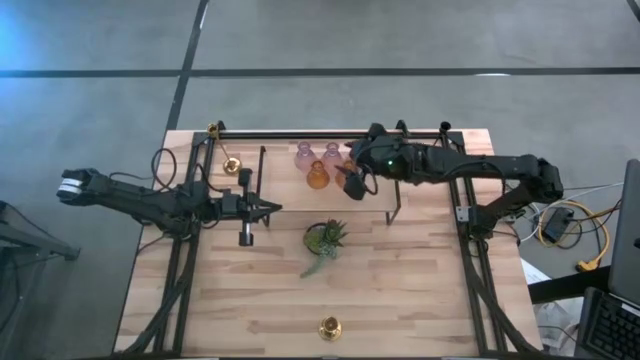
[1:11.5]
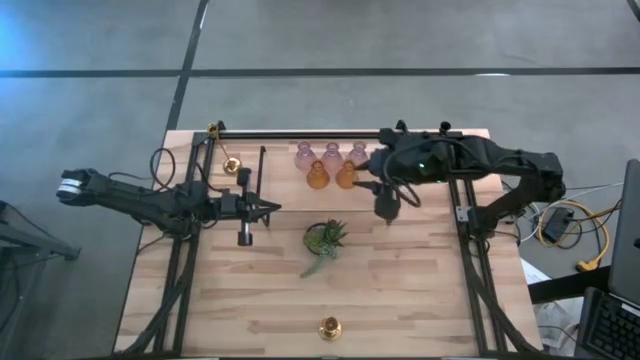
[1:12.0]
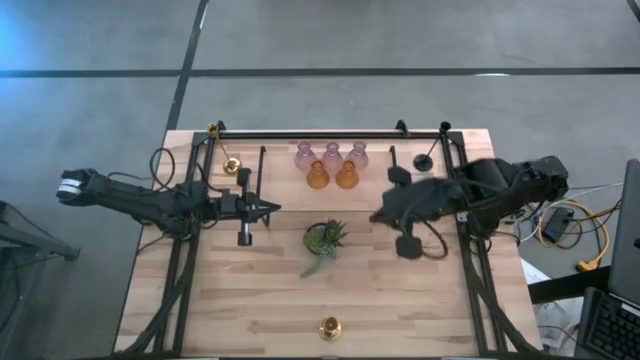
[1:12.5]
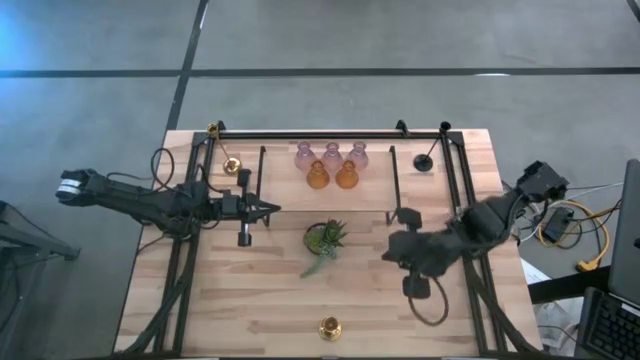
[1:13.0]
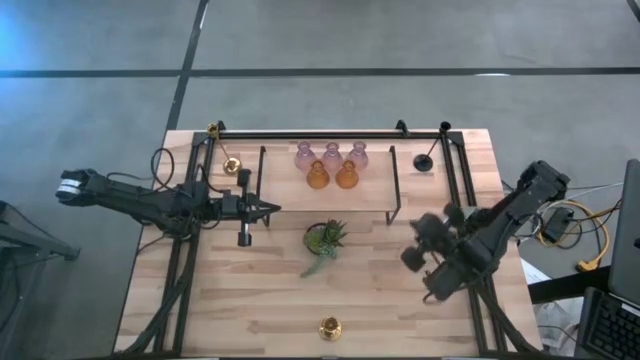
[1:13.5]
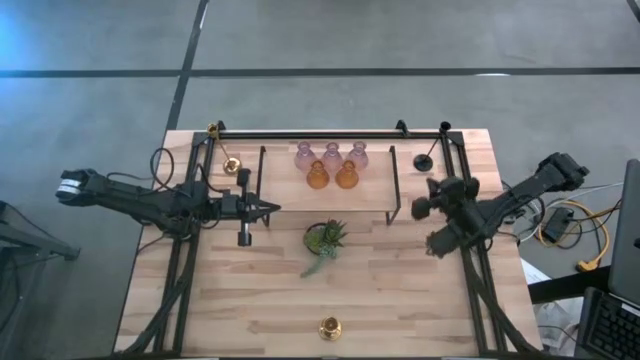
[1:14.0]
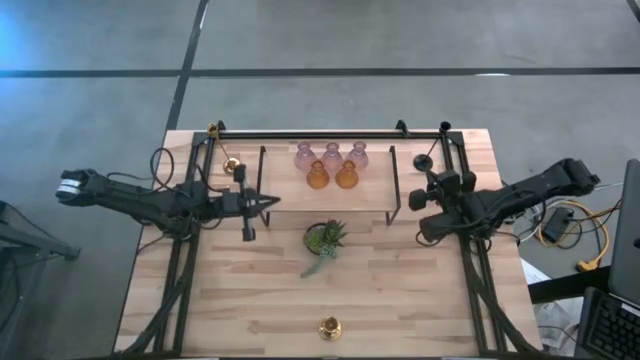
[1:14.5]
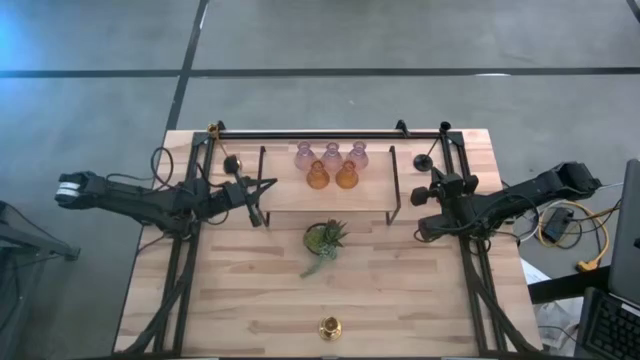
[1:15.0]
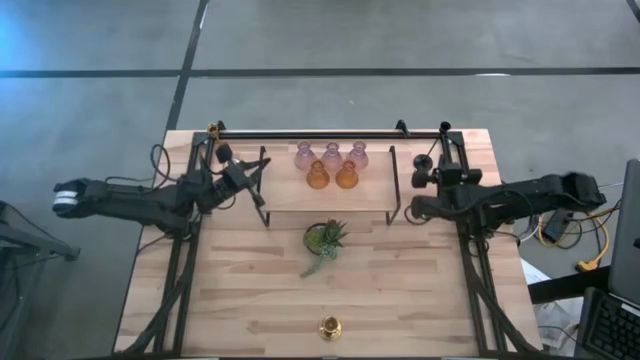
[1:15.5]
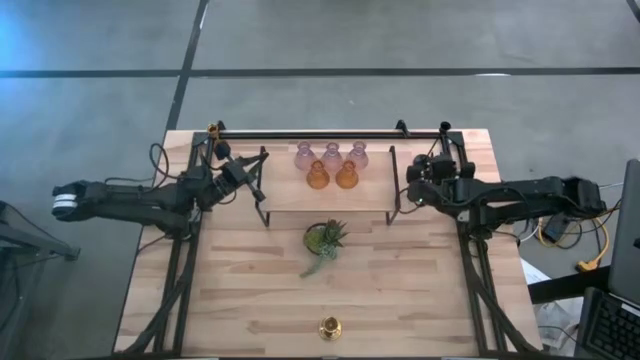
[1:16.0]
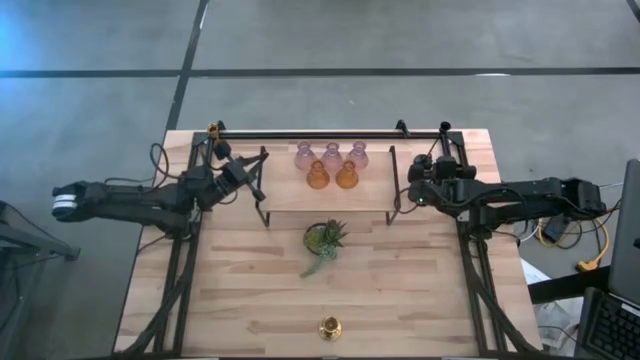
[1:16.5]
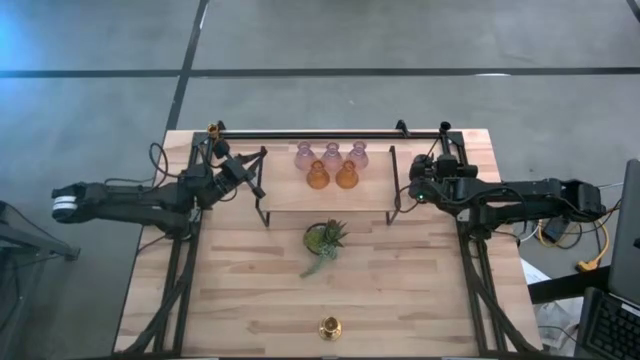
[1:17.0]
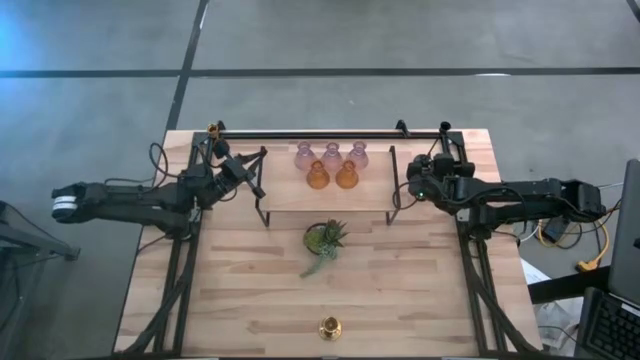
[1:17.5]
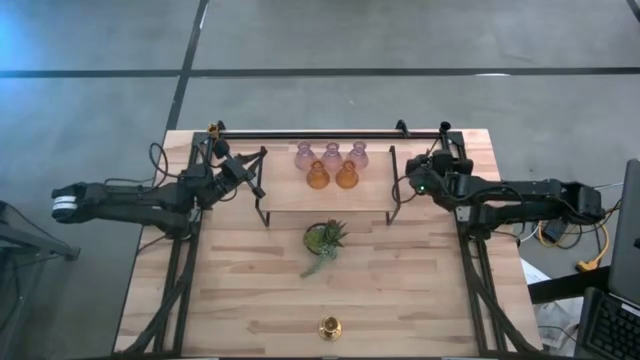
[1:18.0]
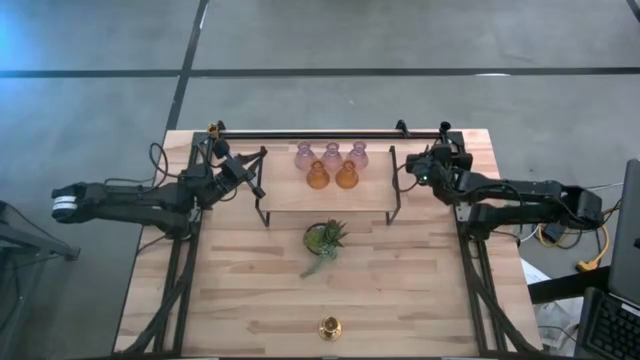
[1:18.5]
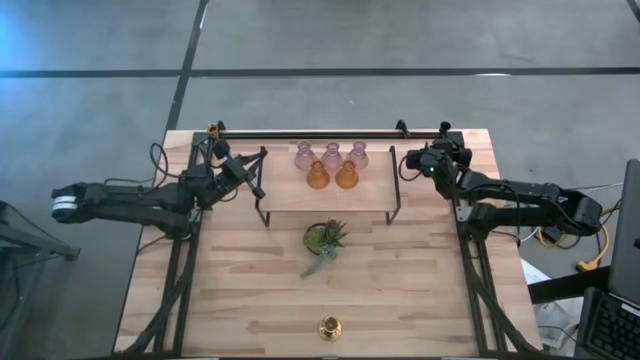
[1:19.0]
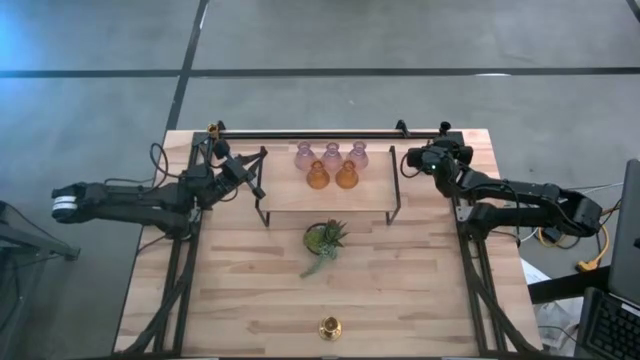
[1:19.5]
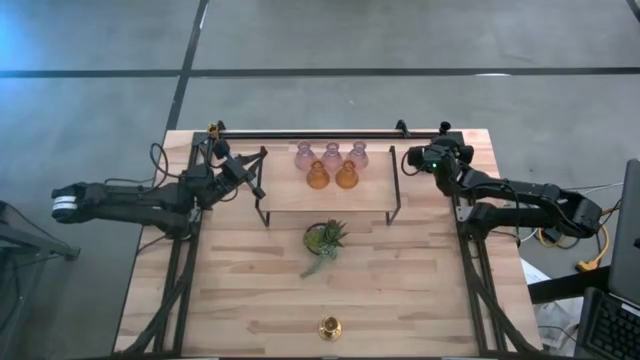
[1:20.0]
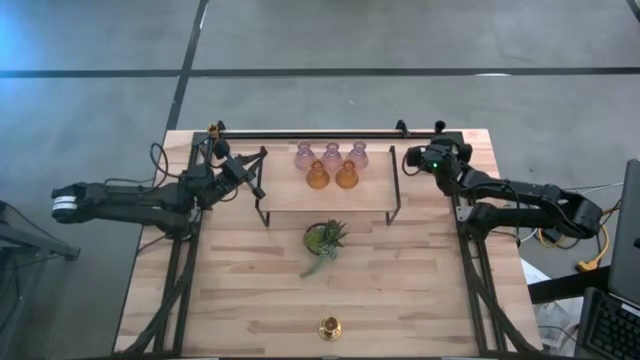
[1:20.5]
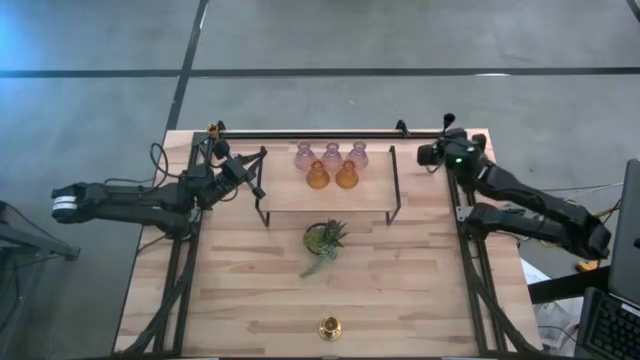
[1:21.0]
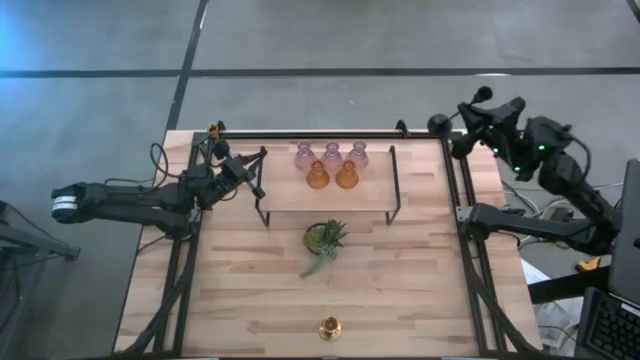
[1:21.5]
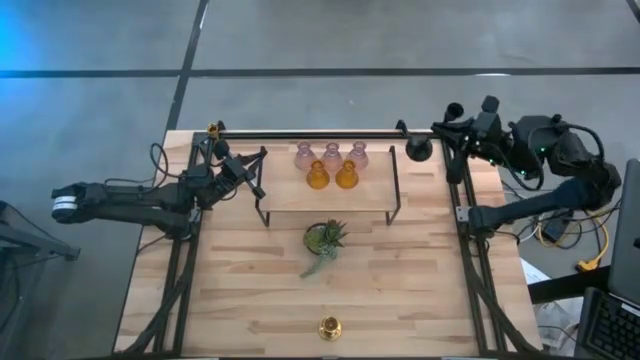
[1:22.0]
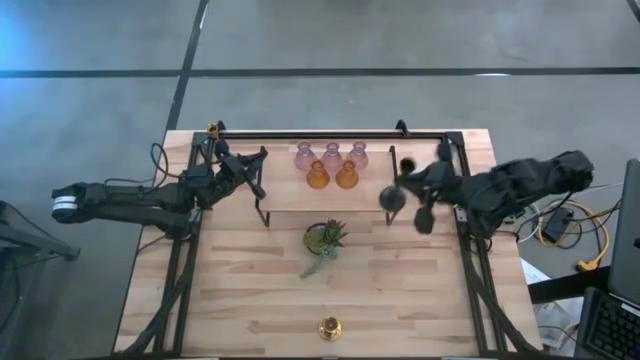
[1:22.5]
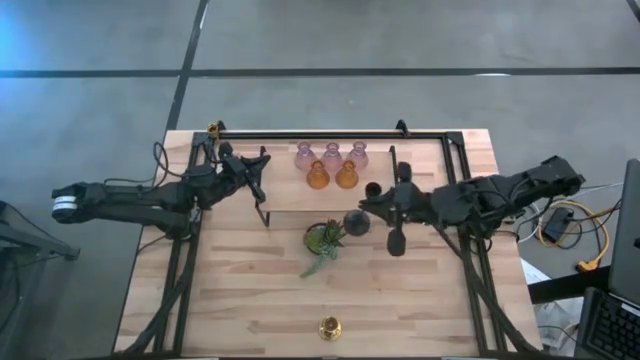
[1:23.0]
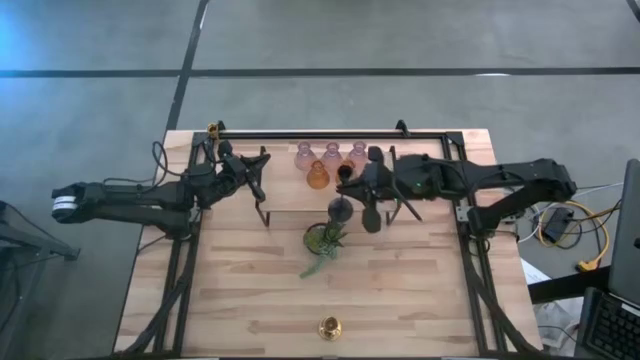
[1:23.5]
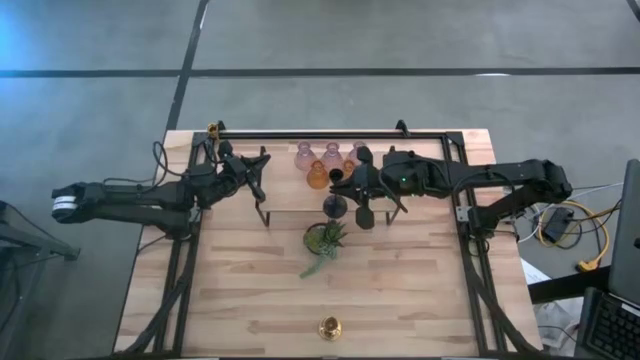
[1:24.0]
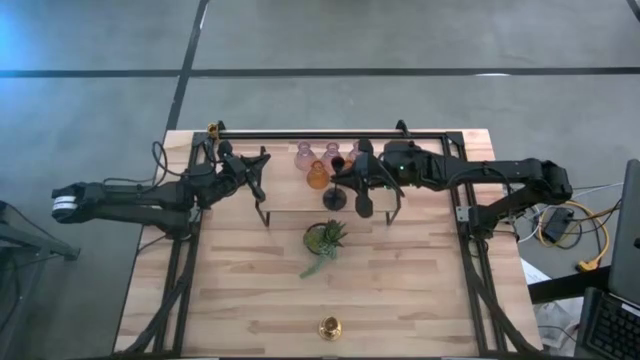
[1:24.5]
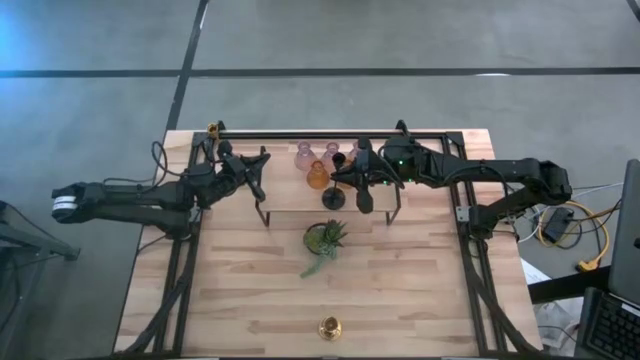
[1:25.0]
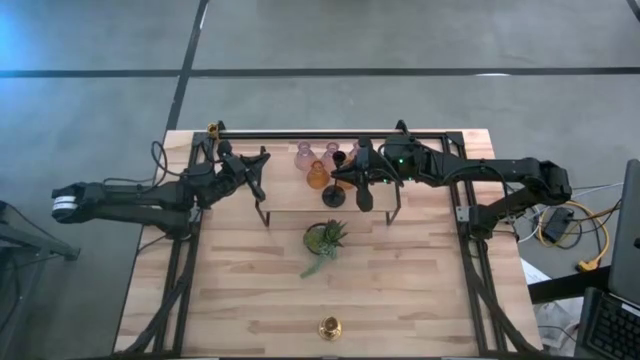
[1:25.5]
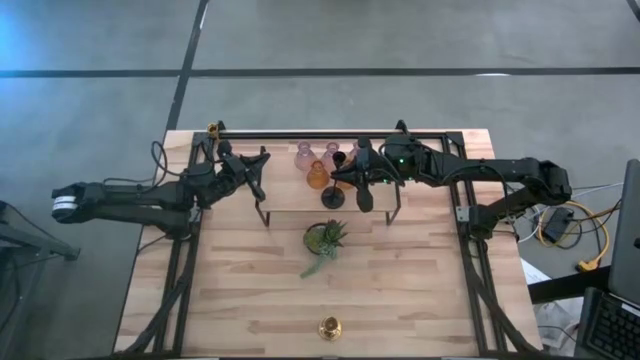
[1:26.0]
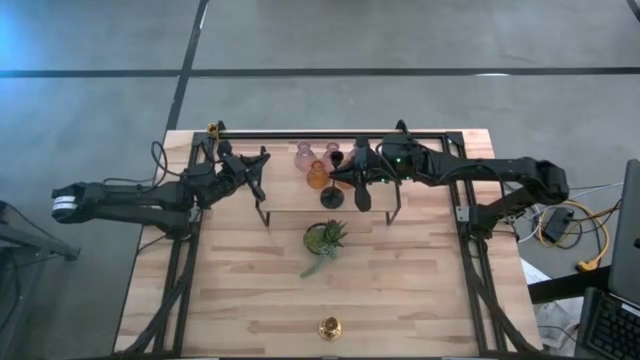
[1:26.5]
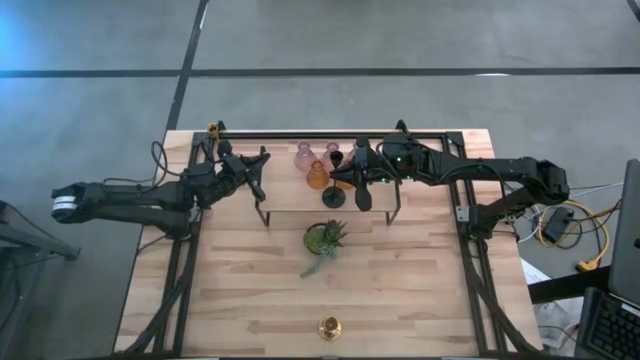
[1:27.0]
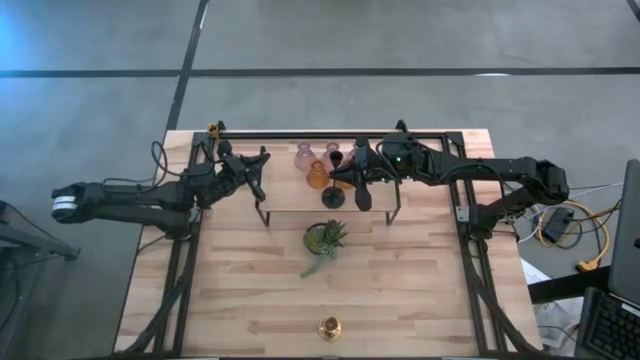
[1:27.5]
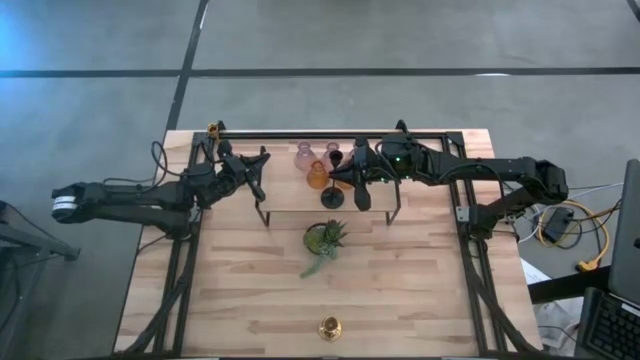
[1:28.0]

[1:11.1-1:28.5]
Task: Pick & Place candle stick holders
Put the black candle holder on the shelf

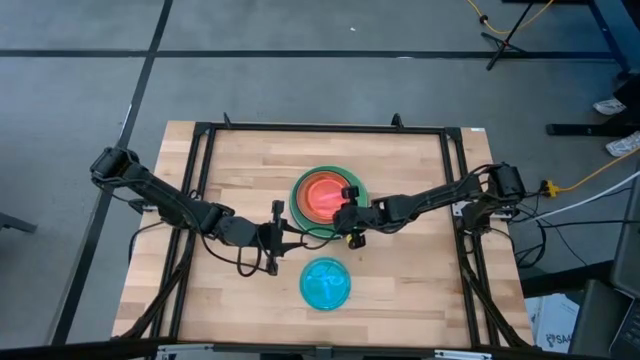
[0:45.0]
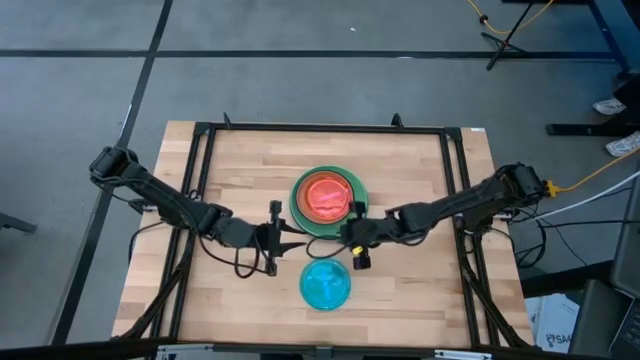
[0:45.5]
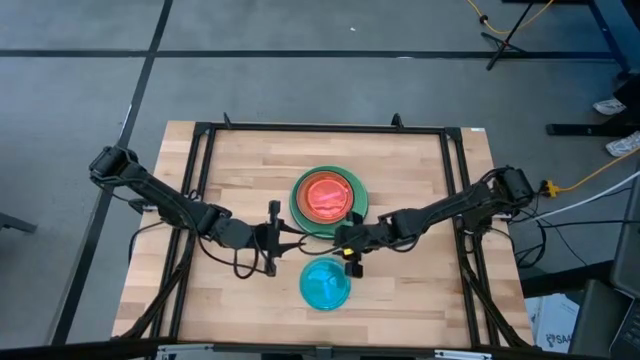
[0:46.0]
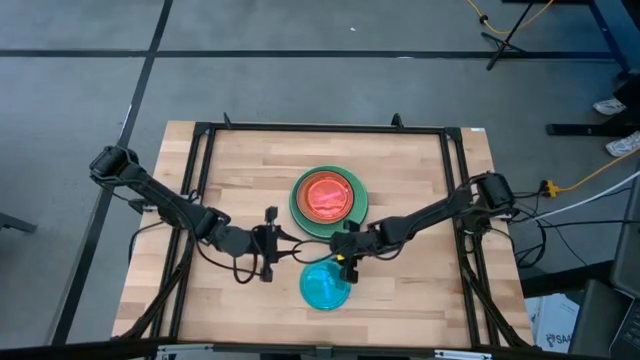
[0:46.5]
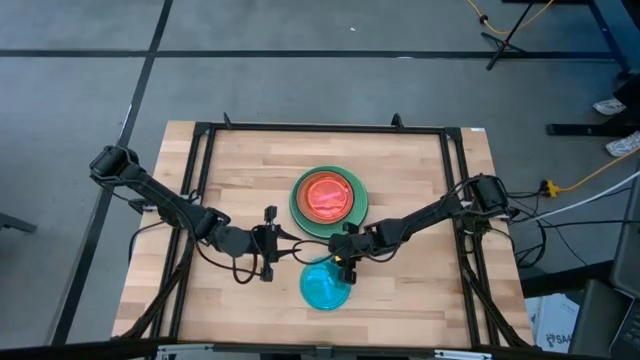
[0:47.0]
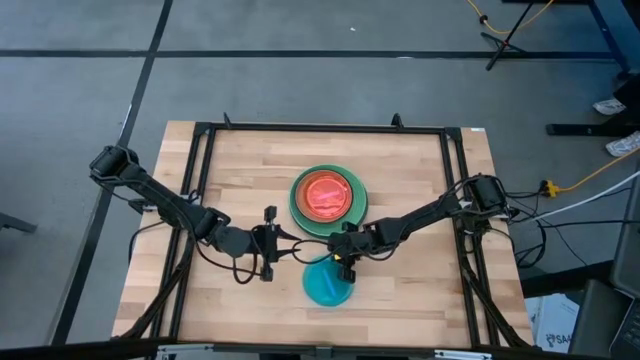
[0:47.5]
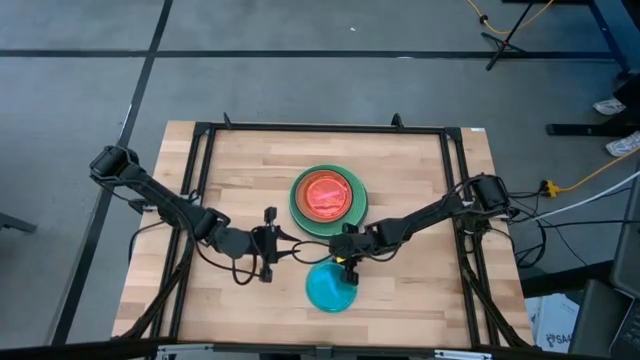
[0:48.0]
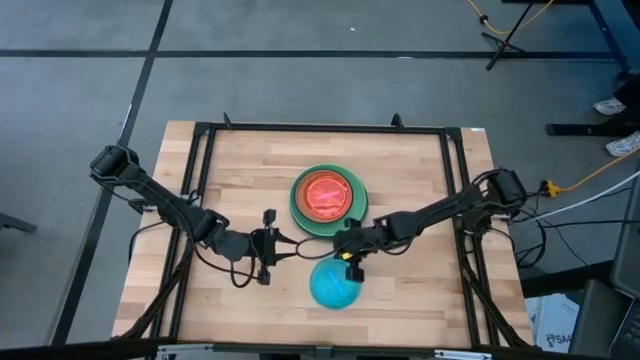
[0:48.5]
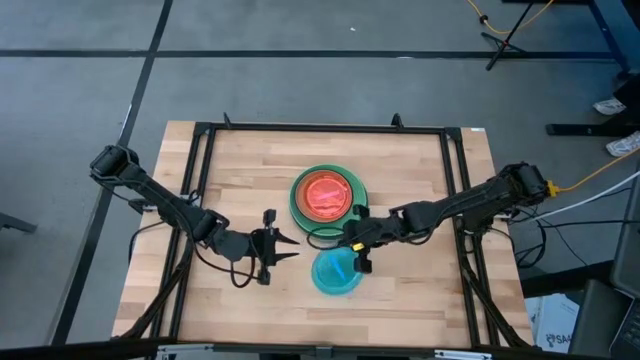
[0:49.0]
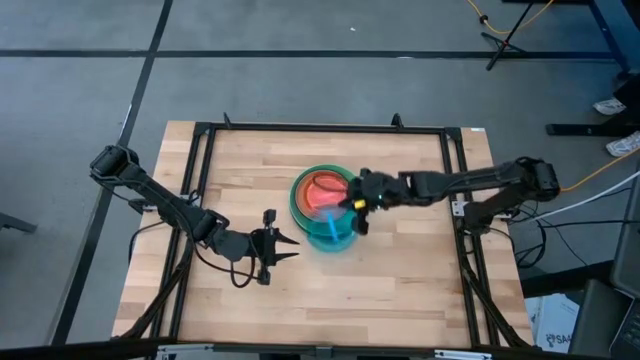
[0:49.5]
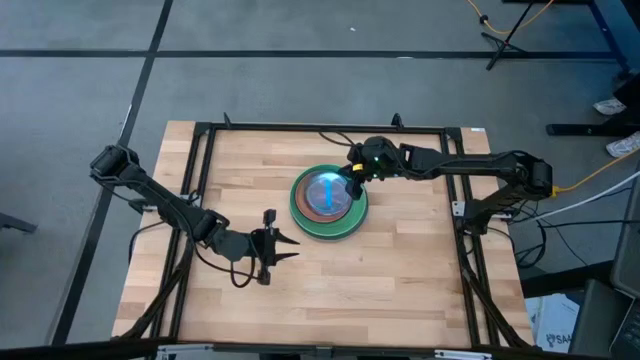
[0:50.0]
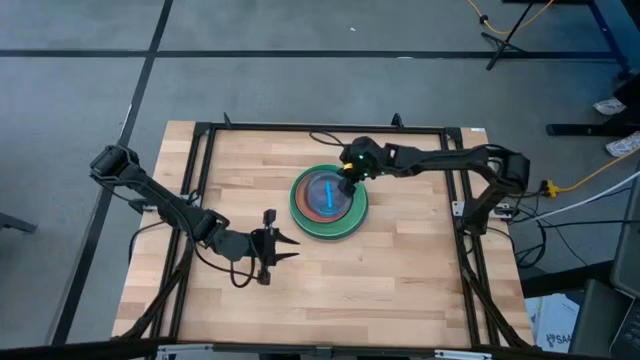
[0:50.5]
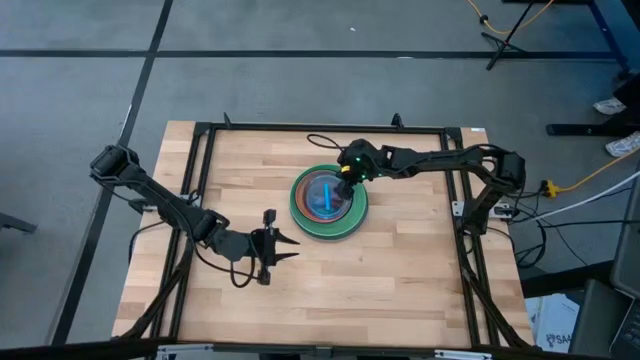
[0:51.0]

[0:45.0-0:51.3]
Task: Stack plastic plates
Stack the light blue plate on top of the light pink plate
